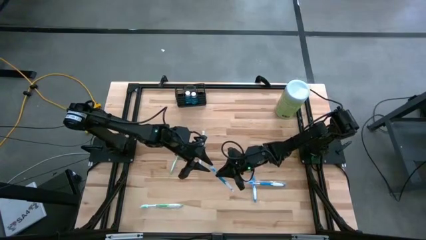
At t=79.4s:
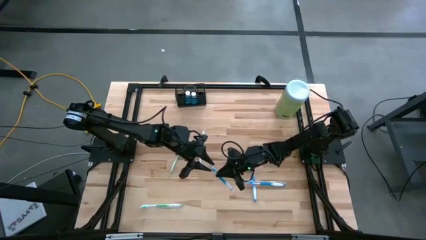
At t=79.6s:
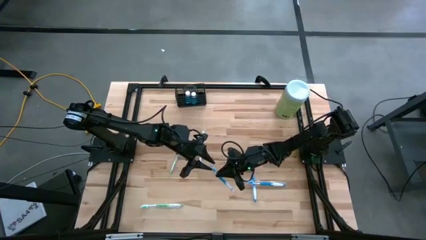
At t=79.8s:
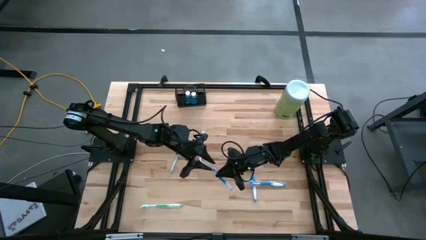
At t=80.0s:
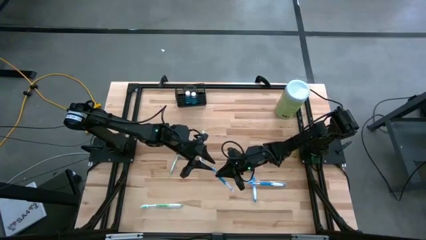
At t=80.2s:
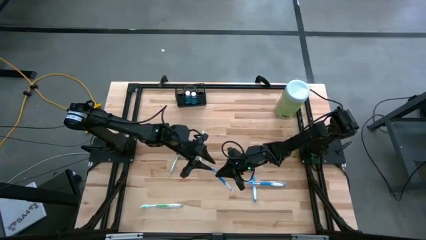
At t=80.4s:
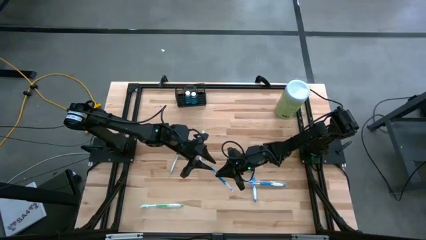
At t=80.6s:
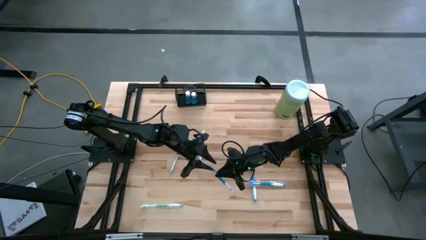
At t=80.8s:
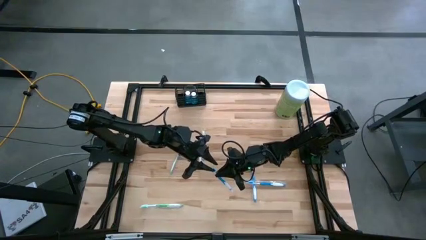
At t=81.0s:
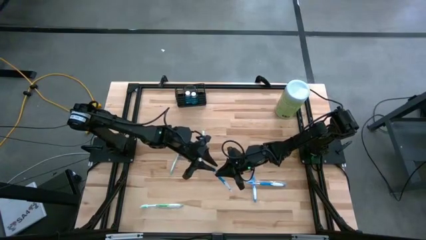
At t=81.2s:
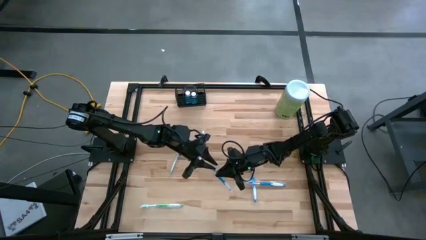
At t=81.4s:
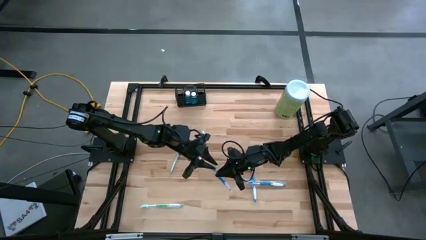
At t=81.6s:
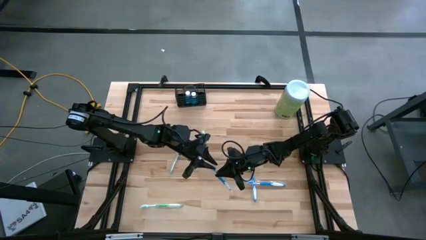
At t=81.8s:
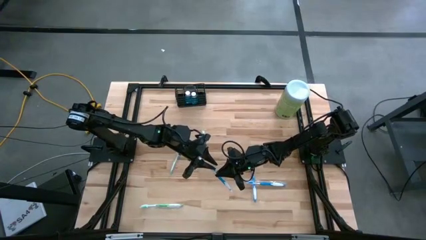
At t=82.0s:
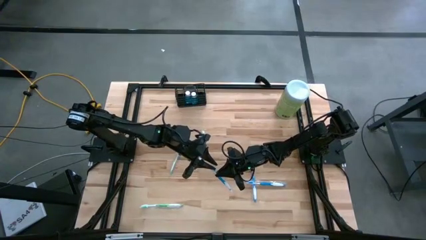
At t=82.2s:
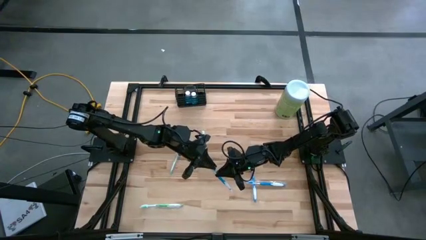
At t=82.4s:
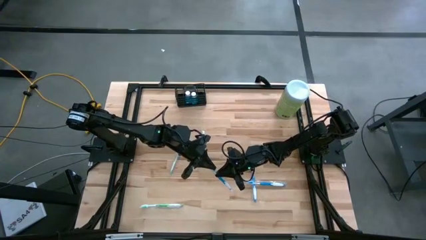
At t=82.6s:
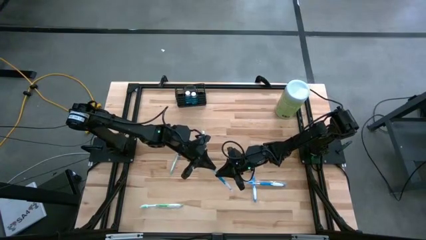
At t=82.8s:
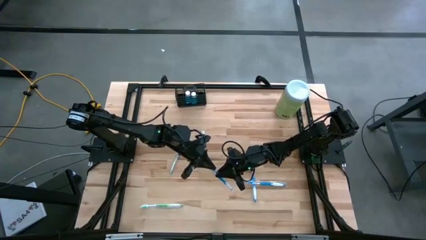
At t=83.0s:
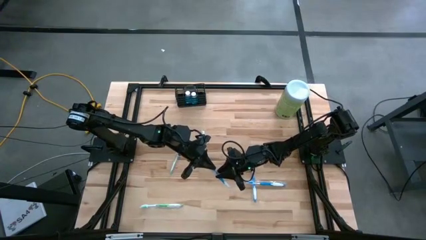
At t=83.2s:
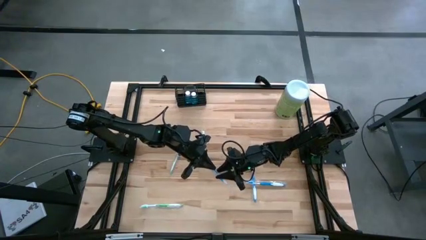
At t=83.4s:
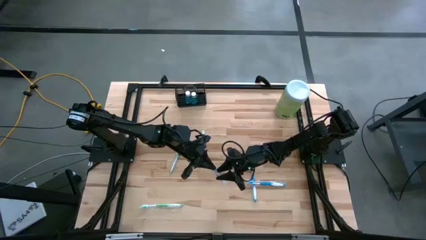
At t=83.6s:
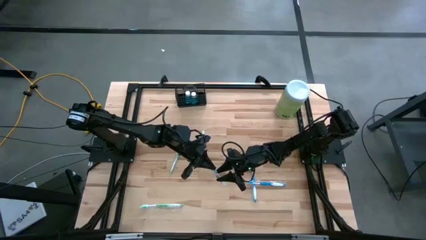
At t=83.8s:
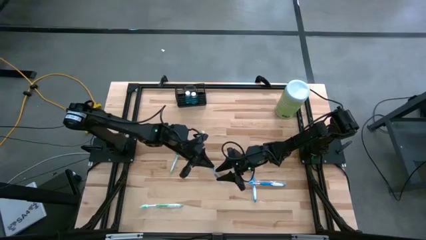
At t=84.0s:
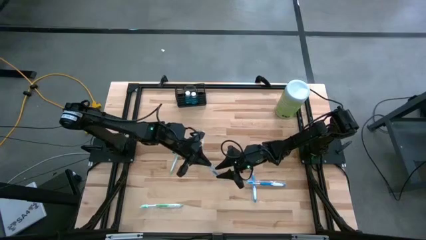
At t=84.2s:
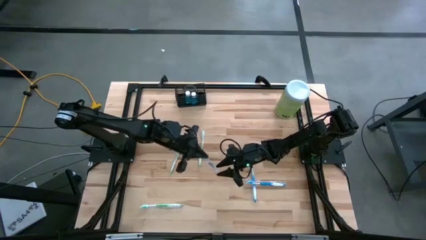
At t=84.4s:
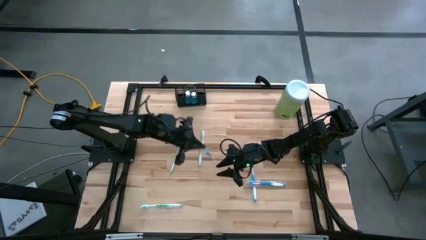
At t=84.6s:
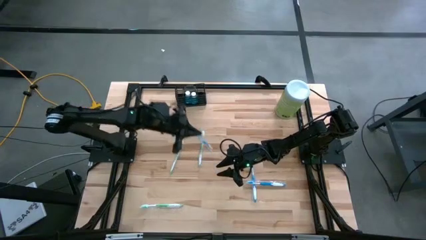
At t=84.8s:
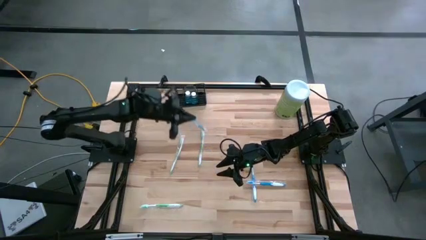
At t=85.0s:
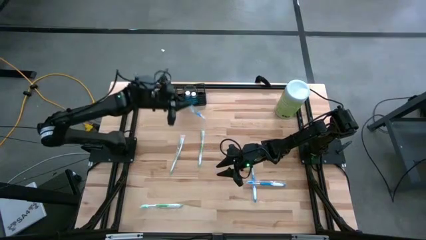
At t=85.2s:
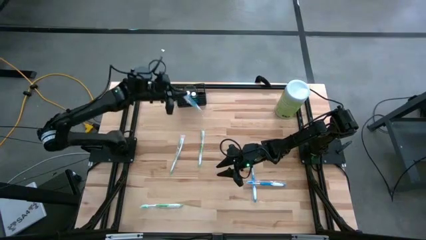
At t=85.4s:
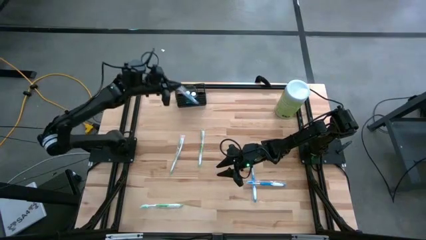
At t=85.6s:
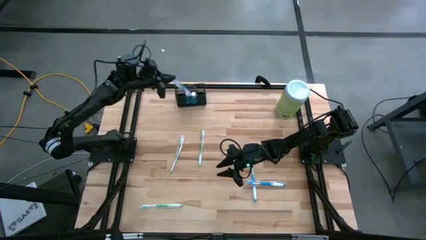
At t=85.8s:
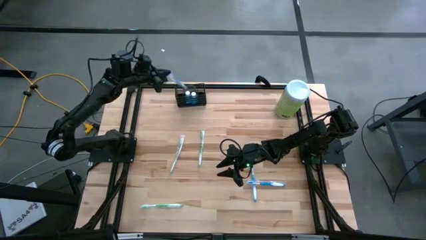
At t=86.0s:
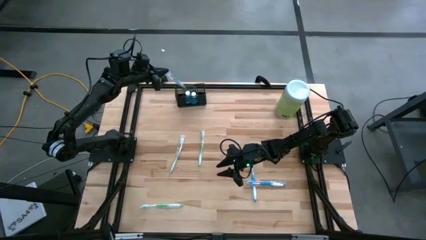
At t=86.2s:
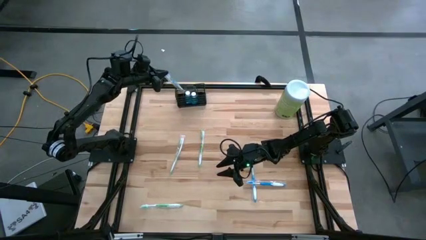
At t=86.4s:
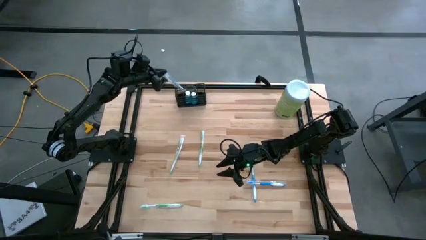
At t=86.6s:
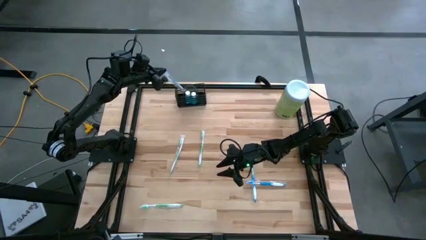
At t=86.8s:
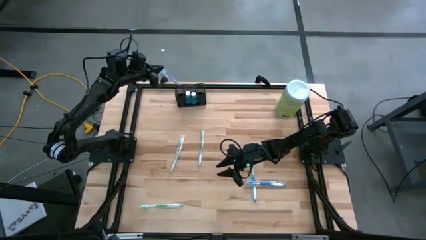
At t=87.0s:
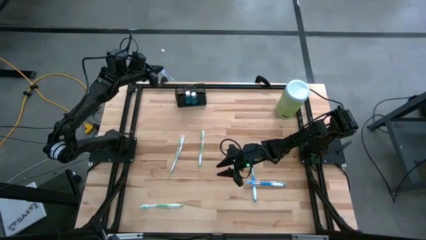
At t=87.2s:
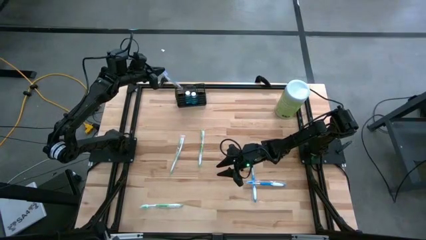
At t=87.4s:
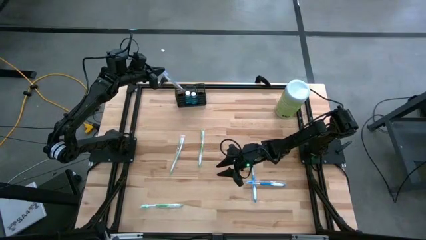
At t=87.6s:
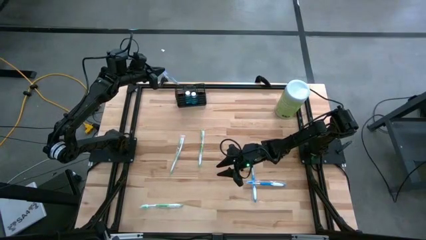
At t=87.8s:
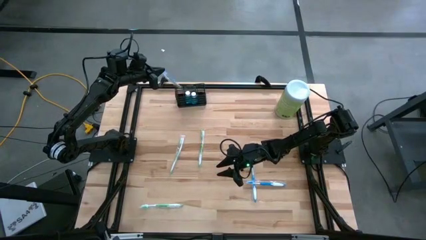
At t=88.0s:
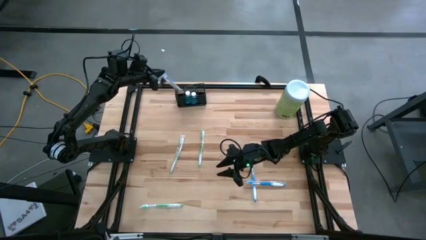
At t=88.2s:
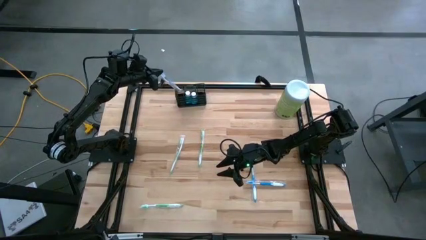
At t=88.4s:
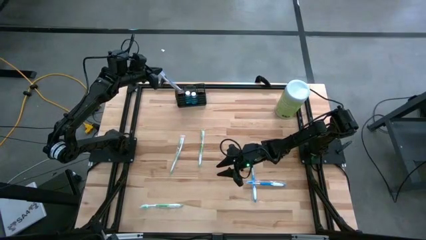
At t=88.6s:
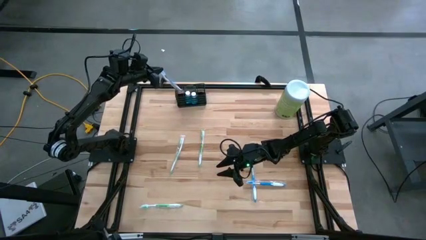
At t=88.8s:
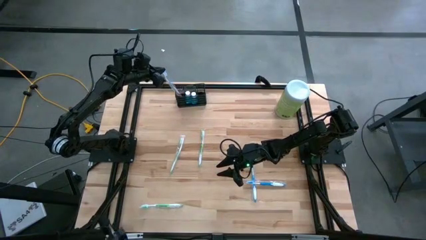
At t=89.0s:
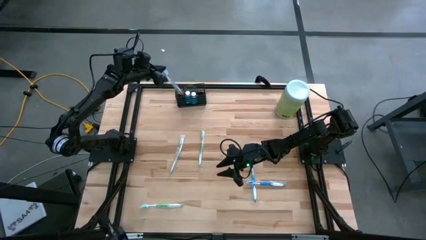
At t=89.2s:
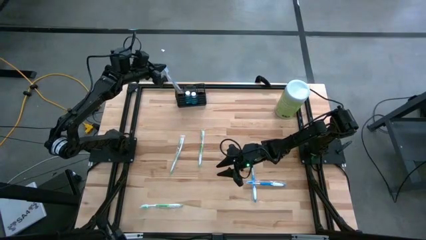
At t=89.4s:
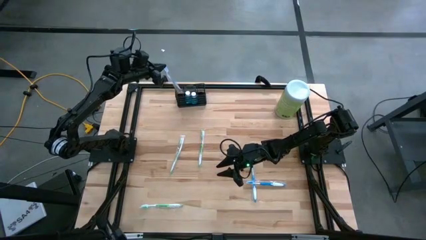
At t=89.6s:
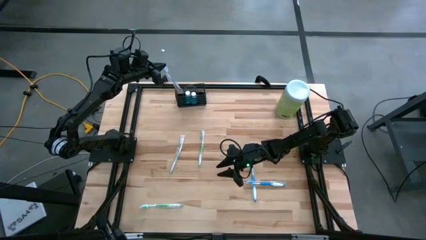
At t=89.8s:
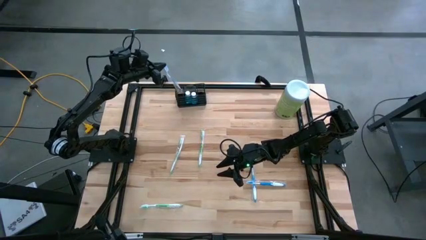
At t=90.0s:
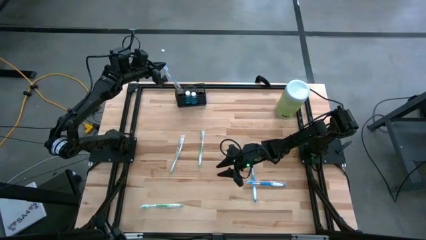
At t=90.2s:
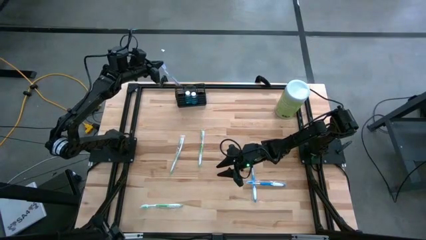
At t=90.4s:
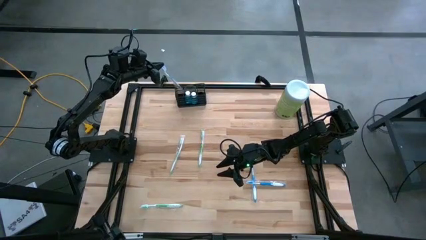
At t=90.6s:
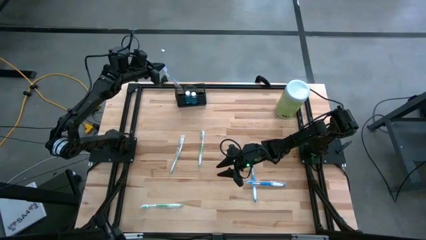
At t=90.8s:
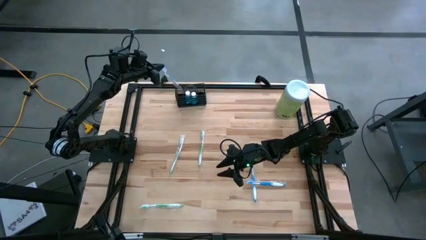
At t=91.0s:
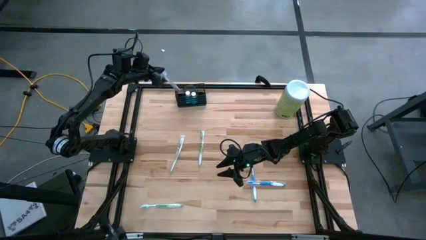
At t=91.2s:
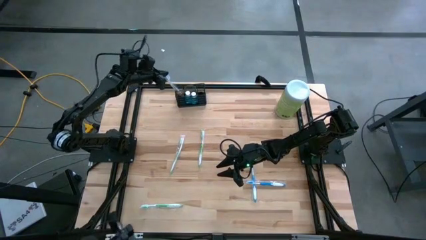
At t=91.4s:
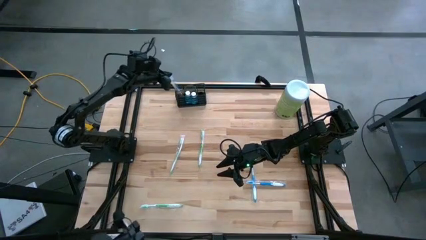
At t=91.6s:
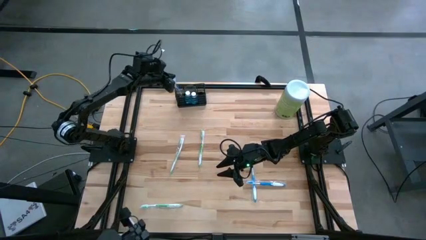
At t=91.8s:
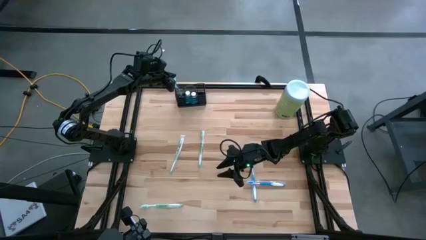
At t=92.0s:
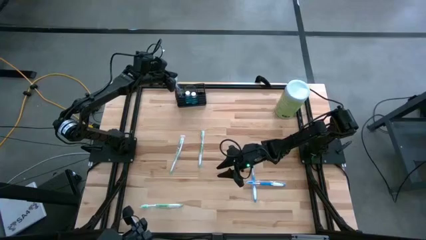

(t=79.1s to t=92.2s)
Task: Pick & Place toothbrushing station
Put the top blue toothbrush into the wire organizer
